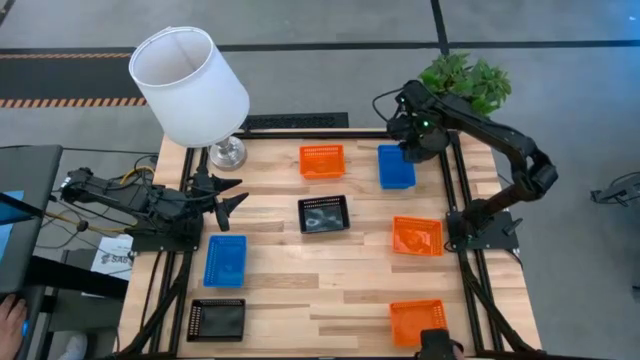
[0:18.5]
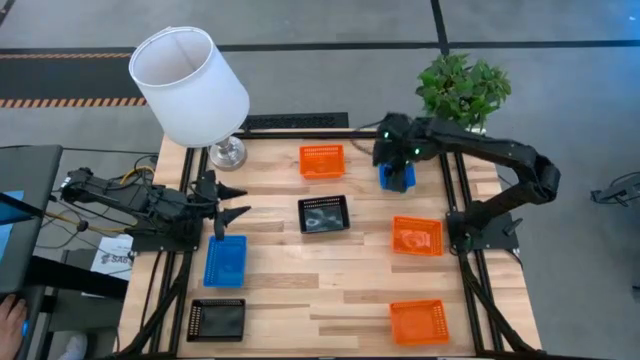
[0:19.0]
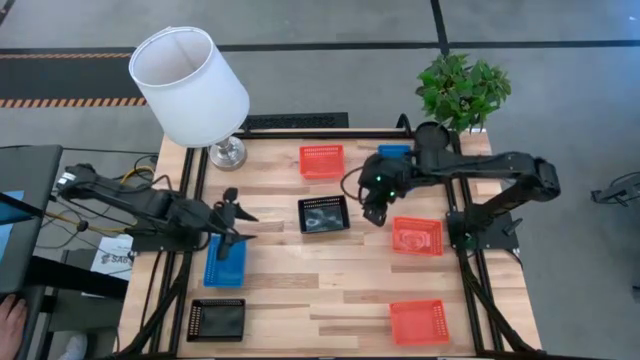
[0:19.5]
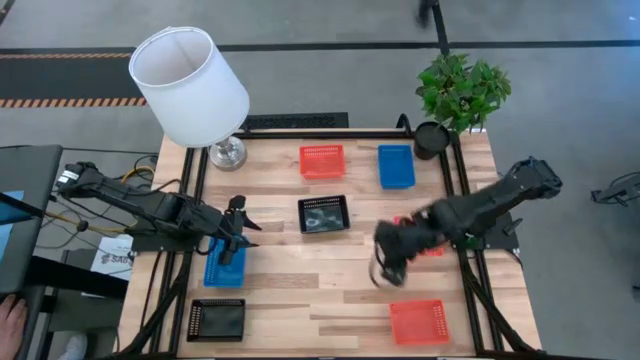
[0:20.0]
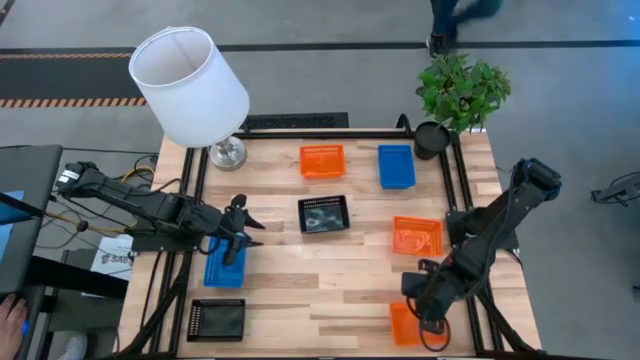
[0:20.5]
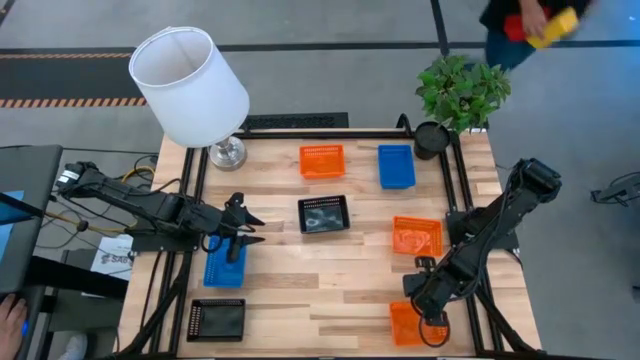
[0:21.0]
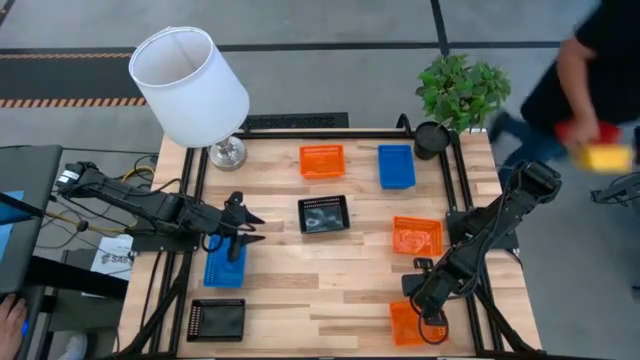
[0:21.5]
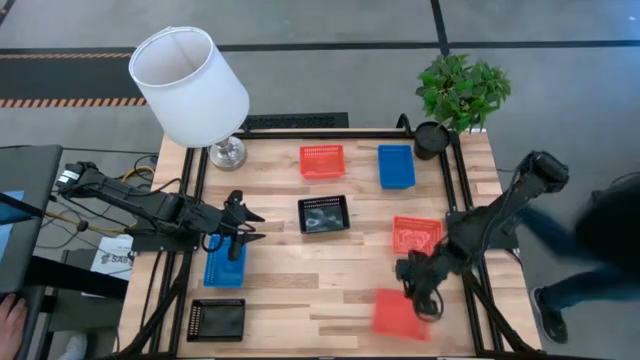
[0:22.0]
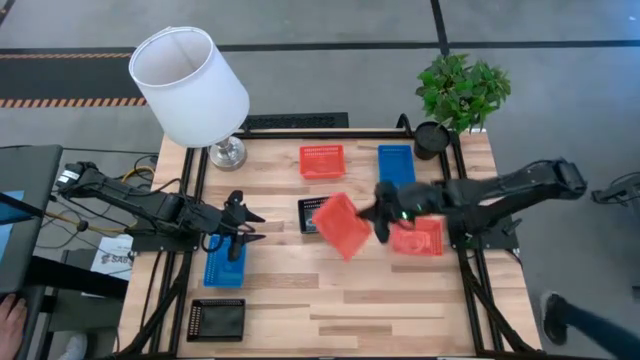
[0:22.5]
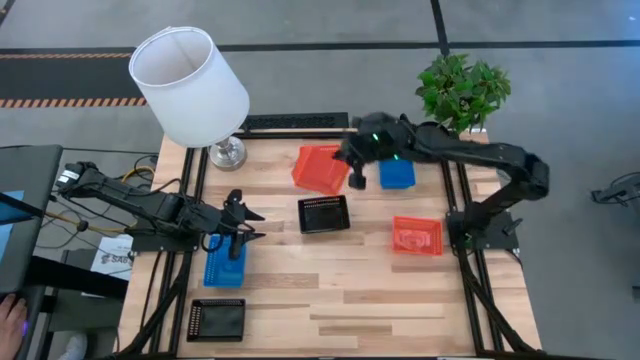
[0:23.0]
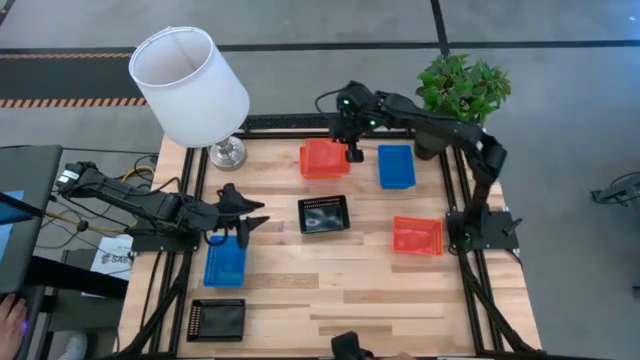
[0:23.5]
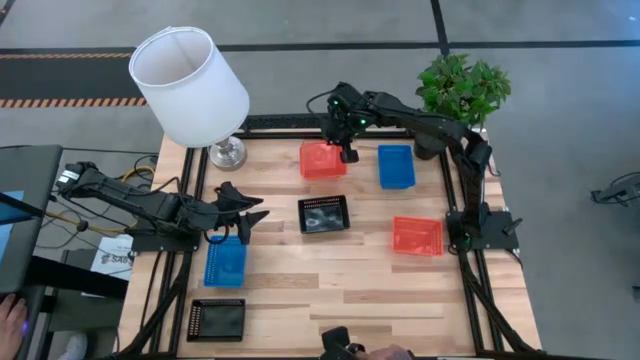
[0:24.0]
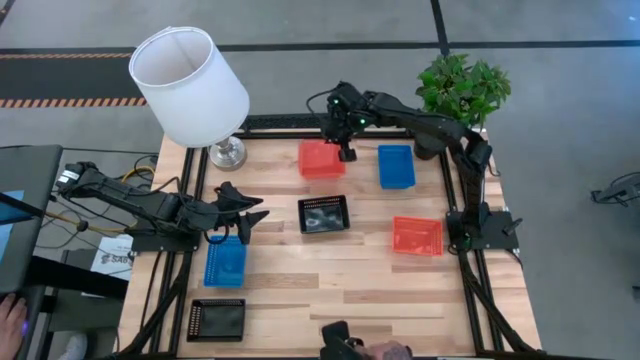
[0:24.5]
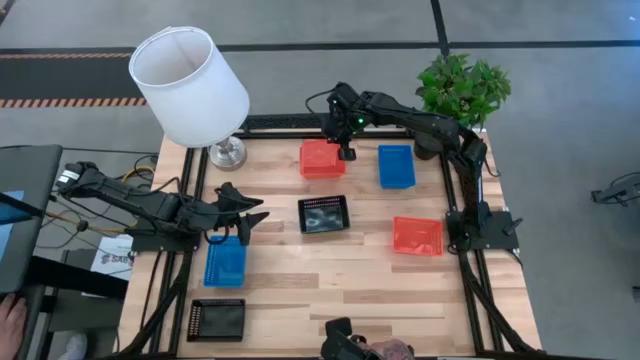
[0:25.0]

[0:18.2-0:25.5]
Stack the bottom orange bin on the top orange bin

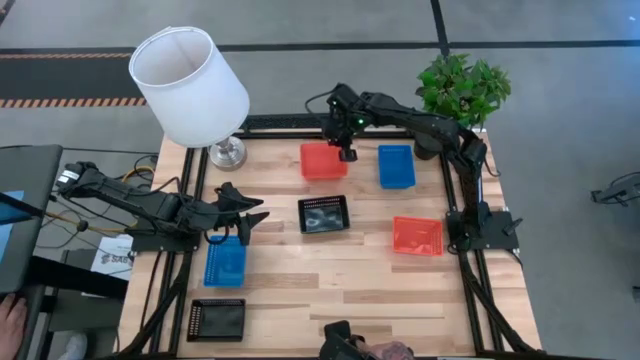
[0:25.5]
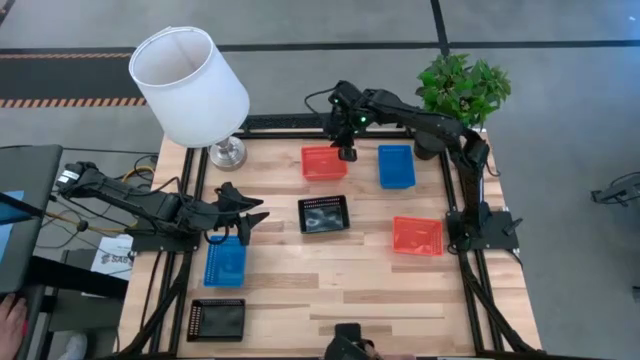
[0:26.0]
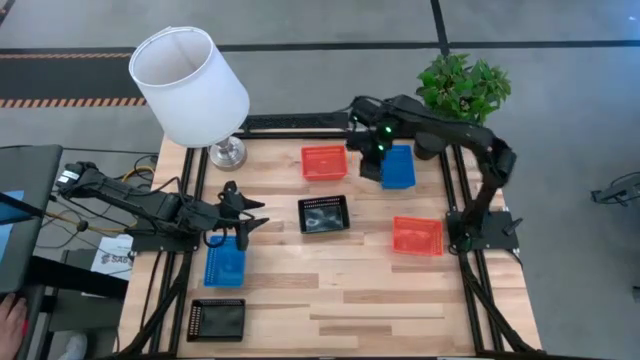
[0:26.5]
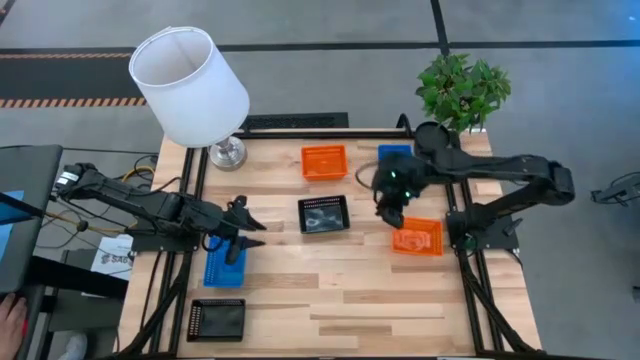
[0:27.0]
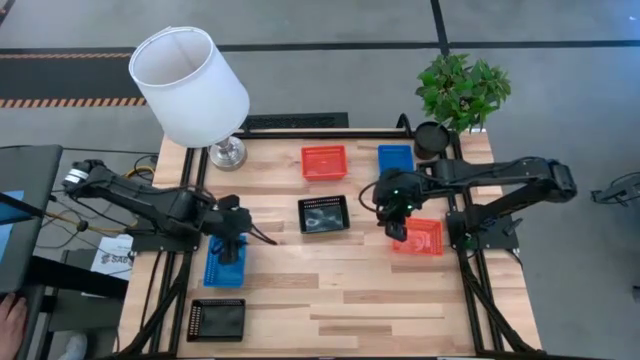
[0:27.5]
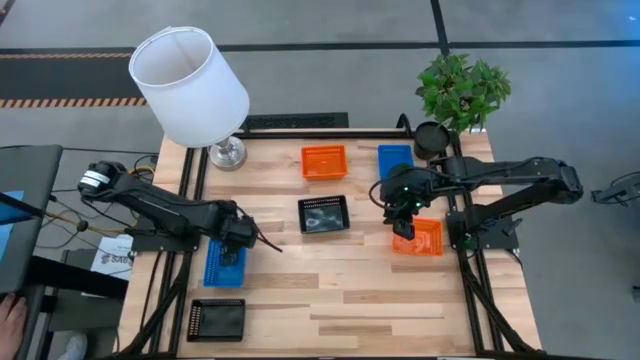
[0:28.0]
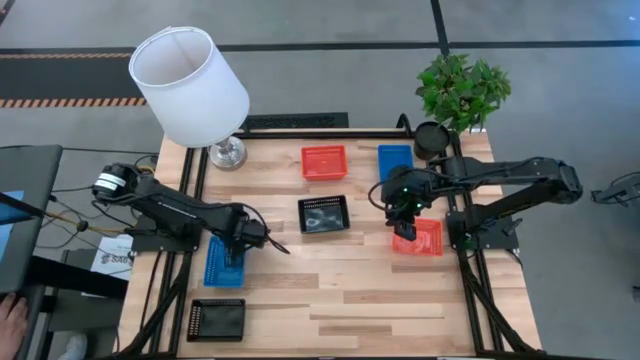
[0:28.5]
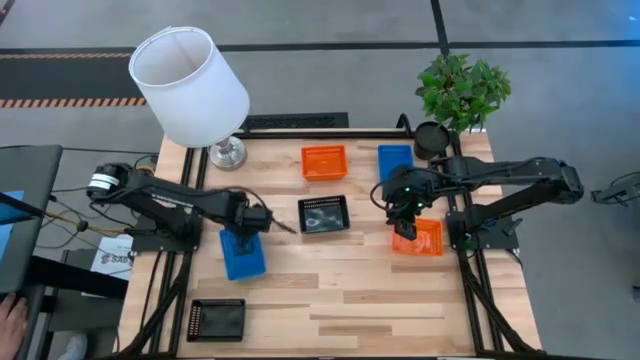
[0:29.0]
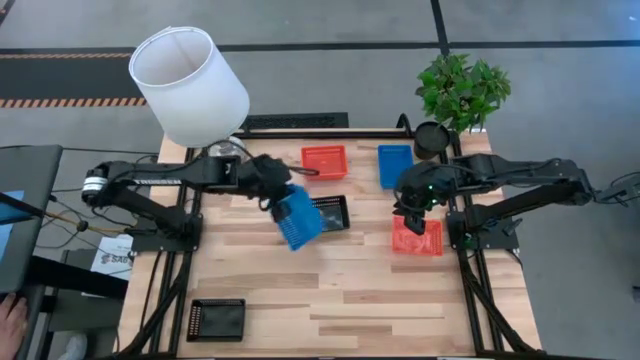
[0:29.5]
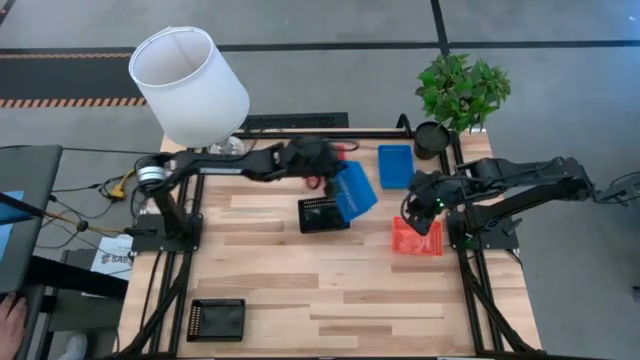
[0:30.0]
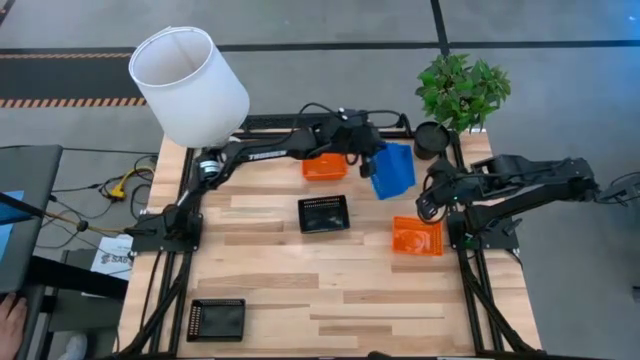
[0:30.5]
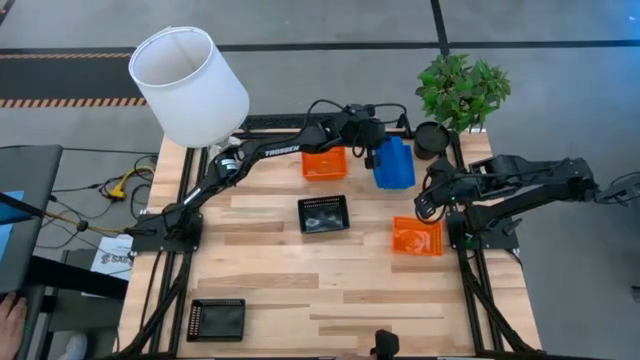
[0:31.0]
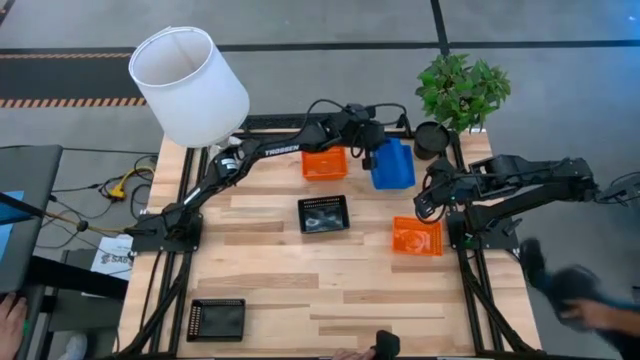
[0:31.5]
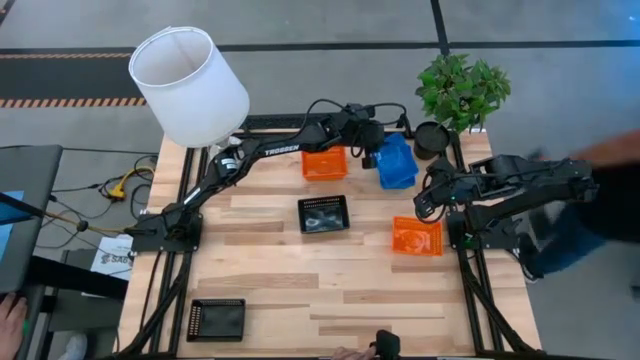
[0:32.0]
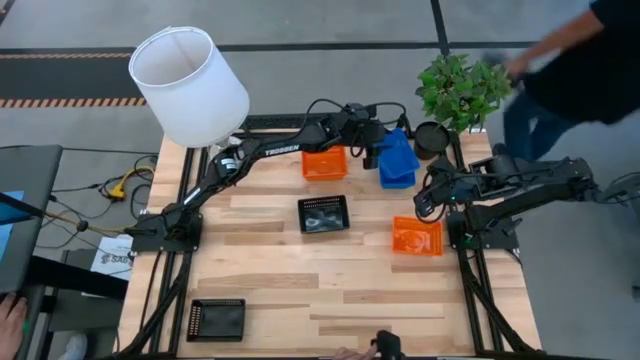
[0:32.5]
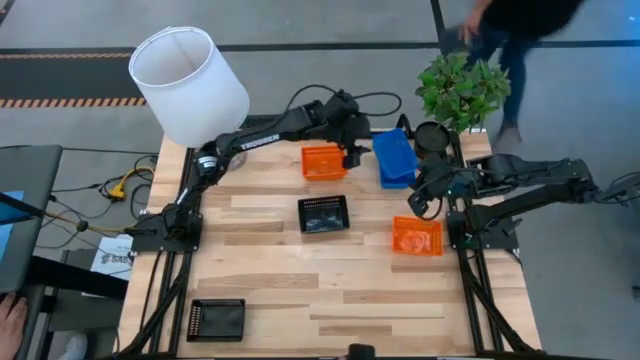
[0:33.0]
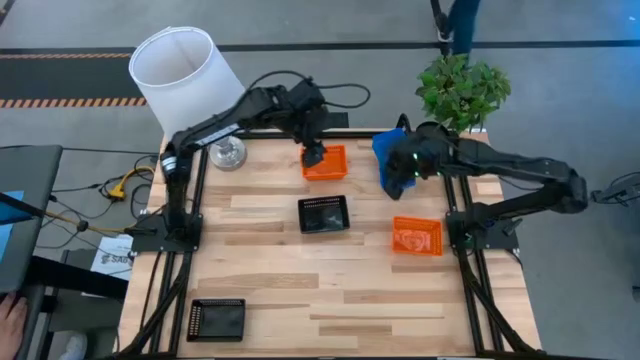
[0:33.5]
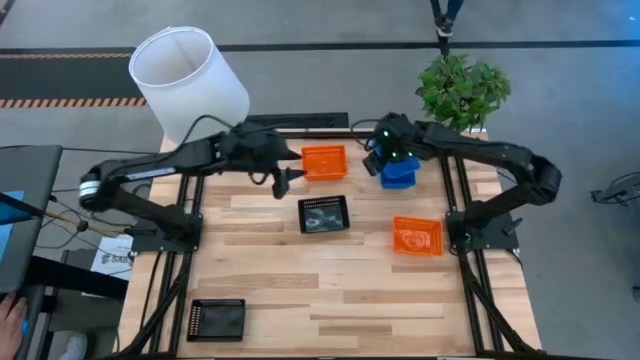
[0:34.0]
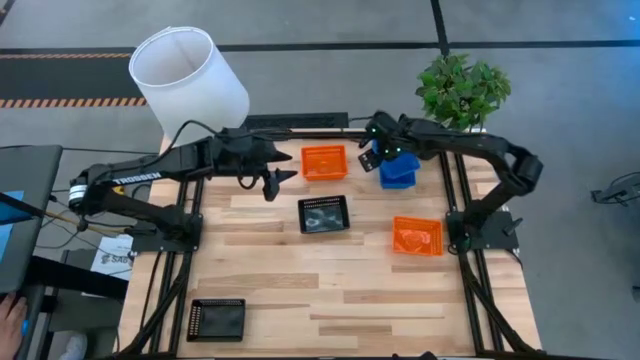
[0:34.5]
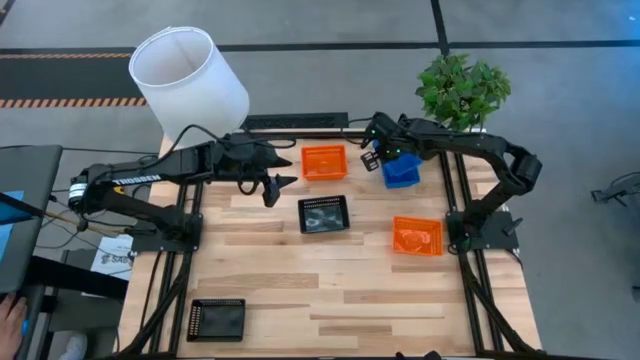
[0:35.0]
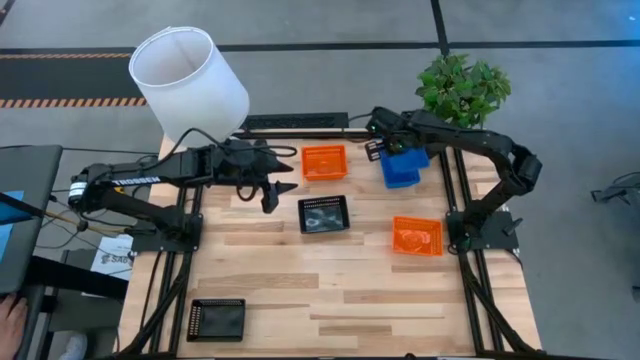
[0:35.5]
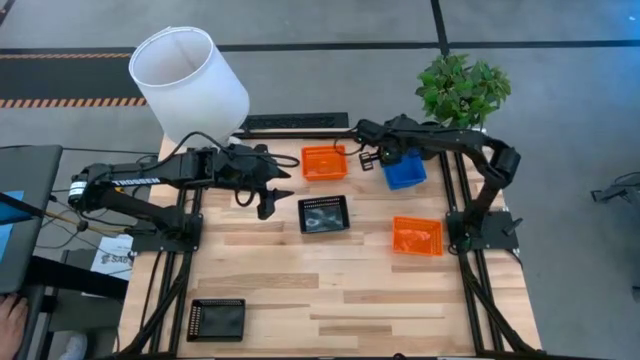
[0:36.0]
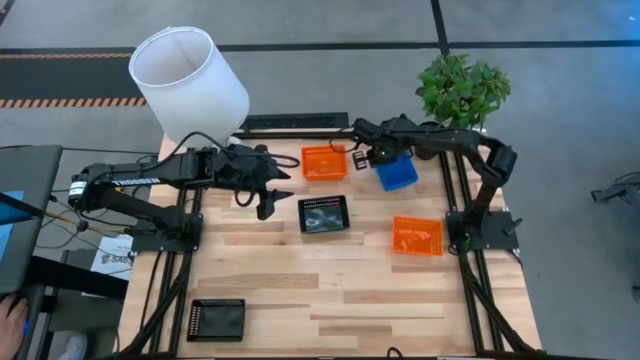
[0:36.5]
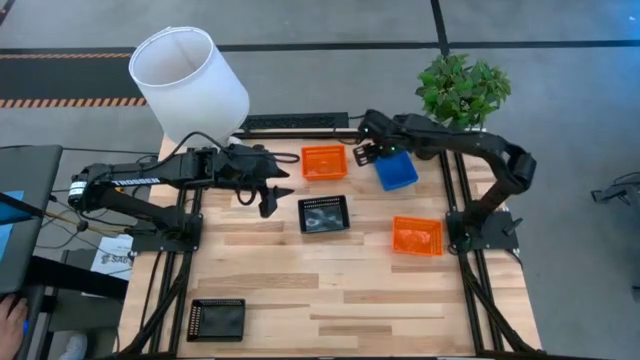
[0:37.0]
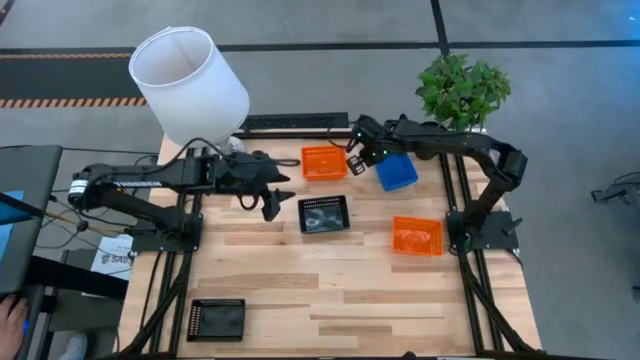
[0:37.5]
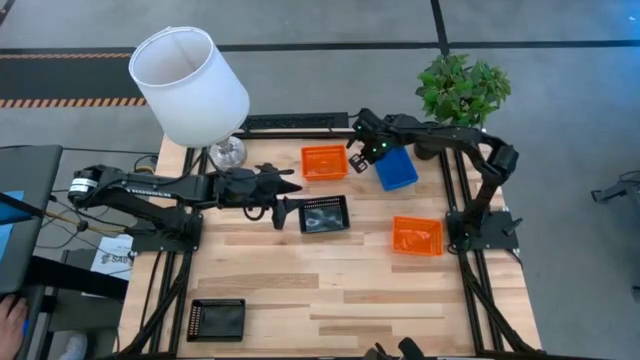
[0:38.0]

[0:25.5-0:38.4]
Stack the blue bin on the top blue bin
